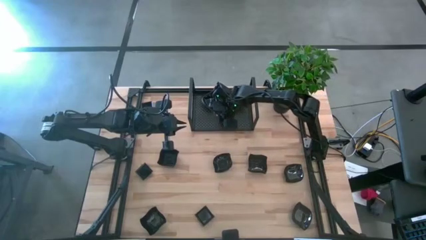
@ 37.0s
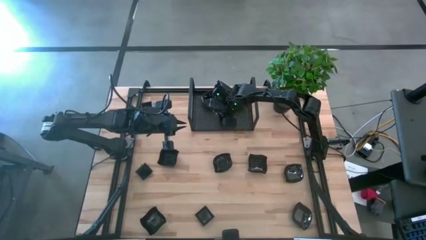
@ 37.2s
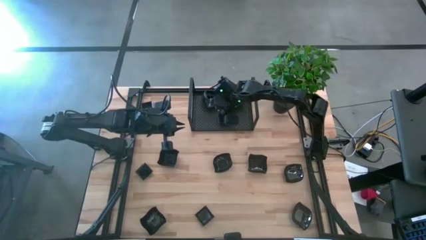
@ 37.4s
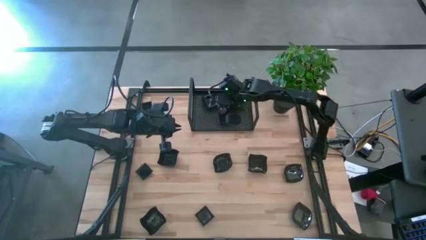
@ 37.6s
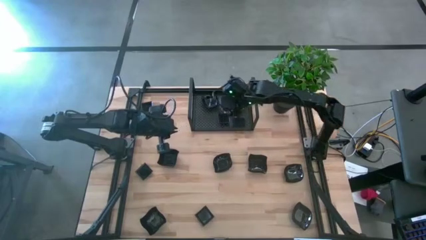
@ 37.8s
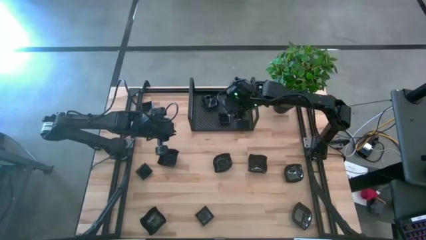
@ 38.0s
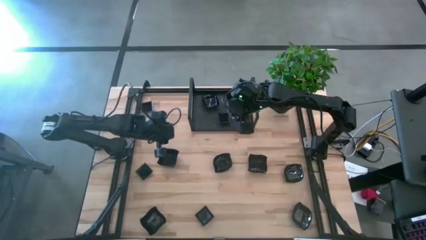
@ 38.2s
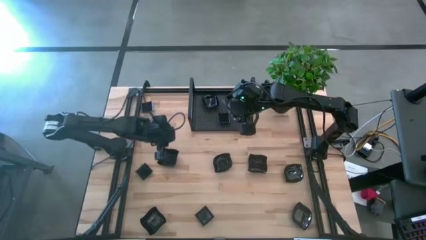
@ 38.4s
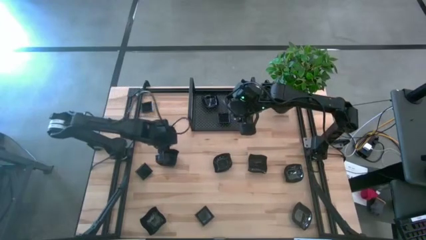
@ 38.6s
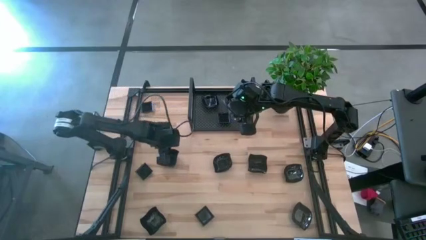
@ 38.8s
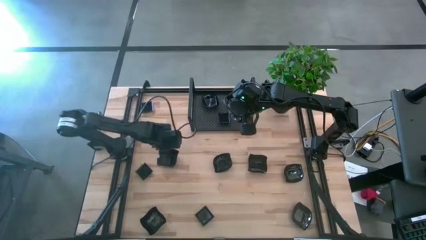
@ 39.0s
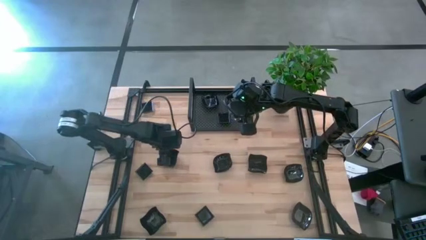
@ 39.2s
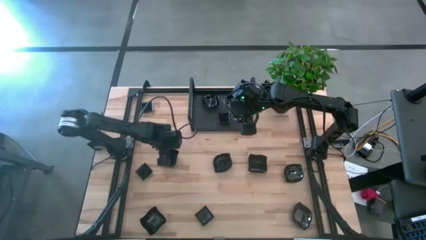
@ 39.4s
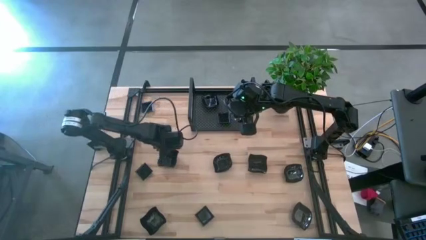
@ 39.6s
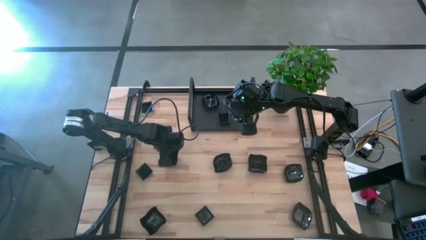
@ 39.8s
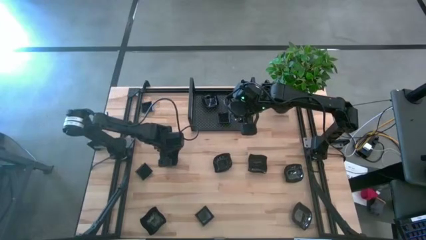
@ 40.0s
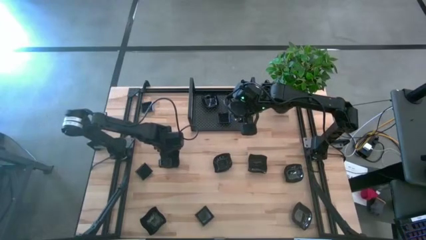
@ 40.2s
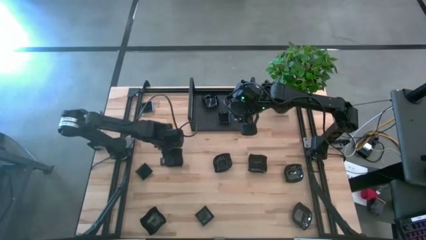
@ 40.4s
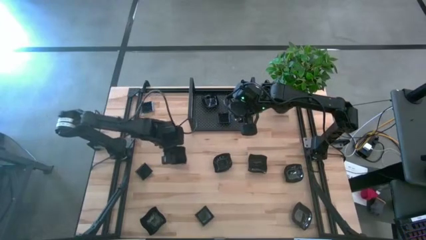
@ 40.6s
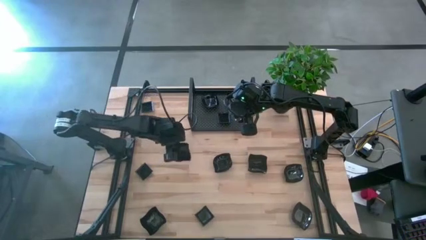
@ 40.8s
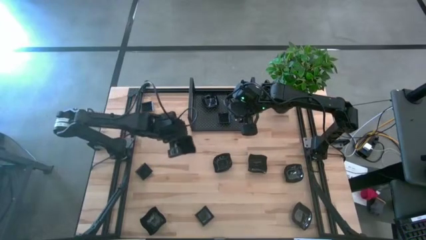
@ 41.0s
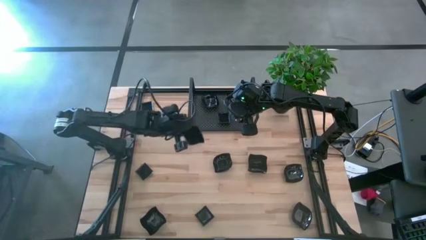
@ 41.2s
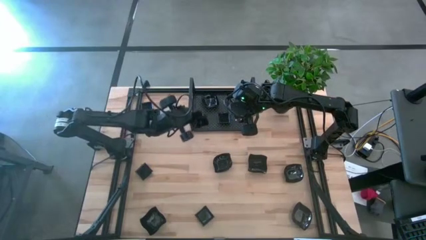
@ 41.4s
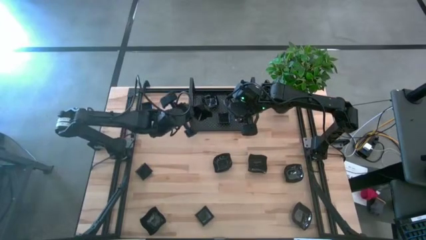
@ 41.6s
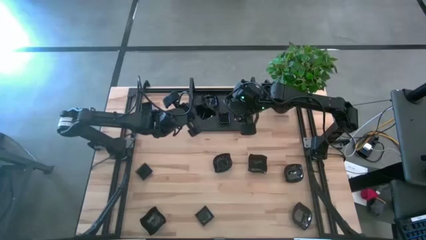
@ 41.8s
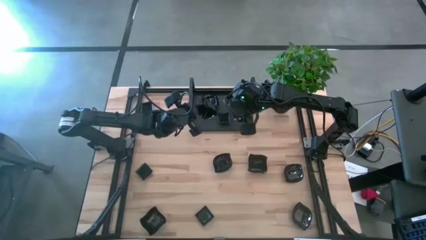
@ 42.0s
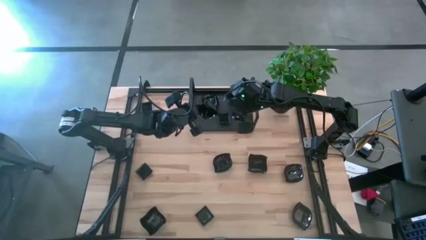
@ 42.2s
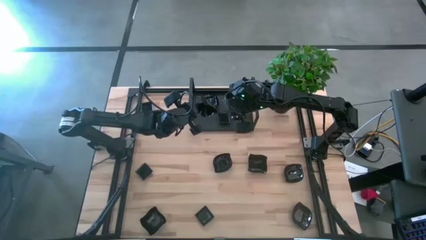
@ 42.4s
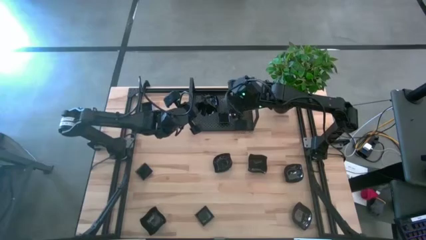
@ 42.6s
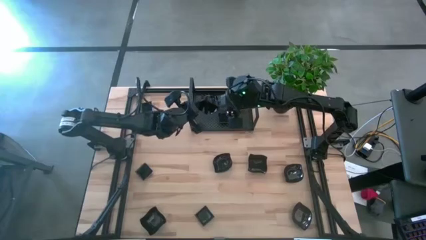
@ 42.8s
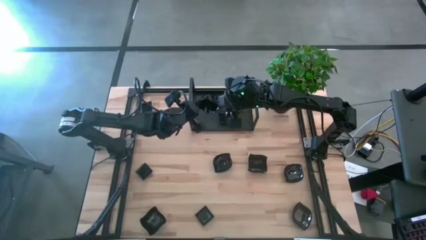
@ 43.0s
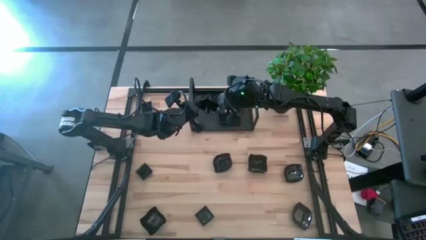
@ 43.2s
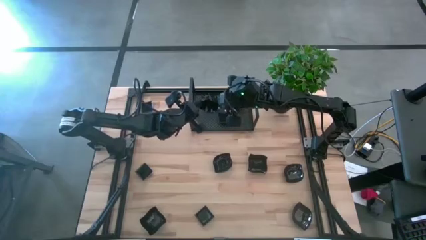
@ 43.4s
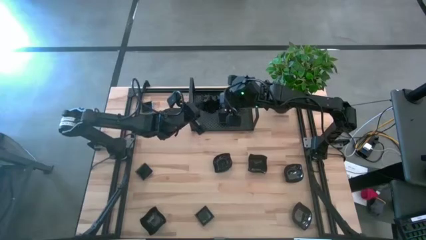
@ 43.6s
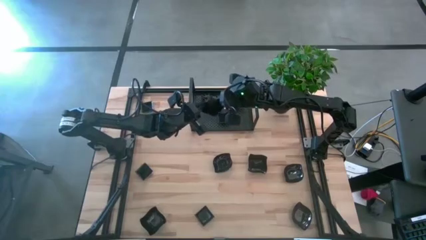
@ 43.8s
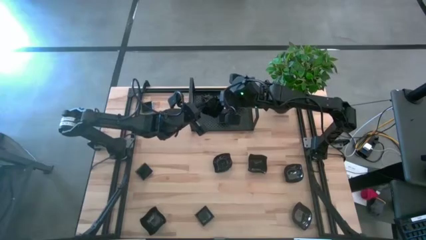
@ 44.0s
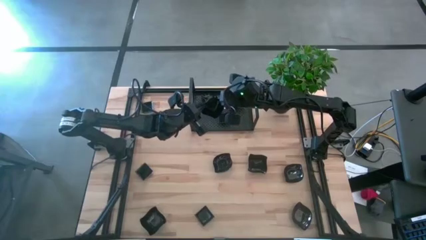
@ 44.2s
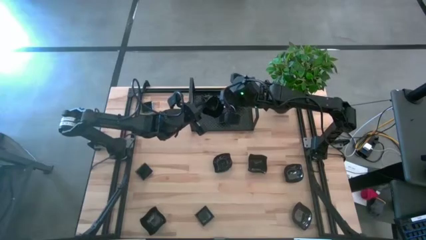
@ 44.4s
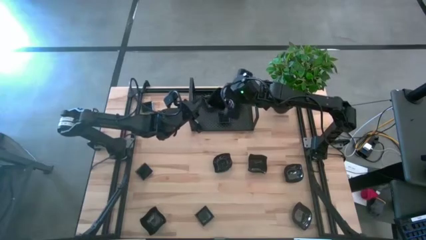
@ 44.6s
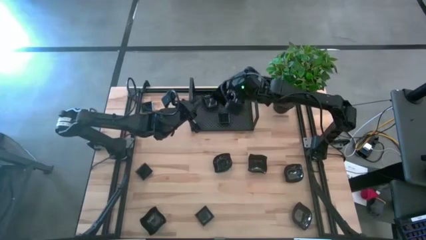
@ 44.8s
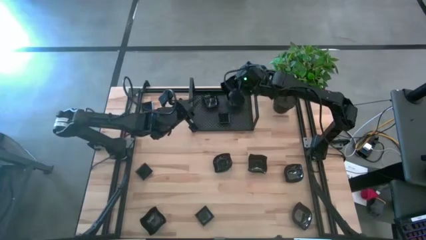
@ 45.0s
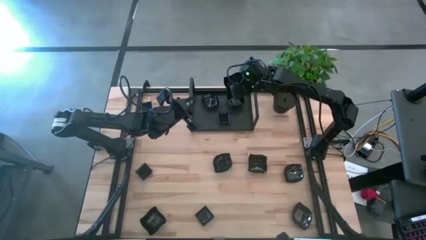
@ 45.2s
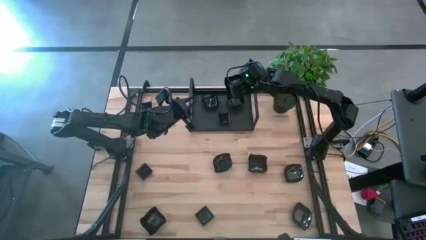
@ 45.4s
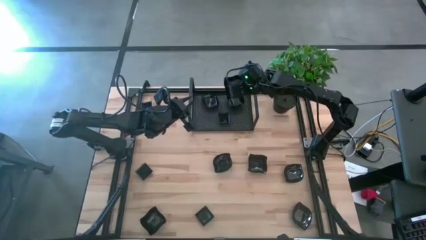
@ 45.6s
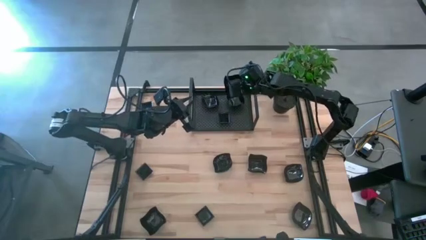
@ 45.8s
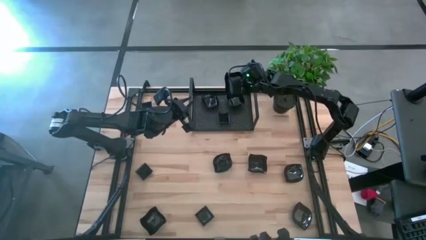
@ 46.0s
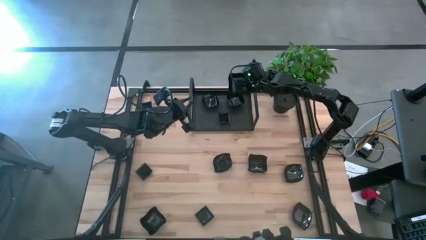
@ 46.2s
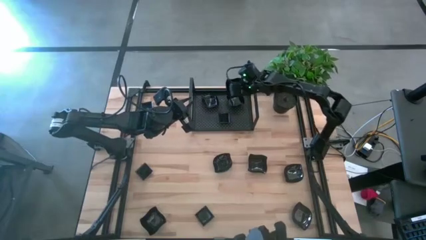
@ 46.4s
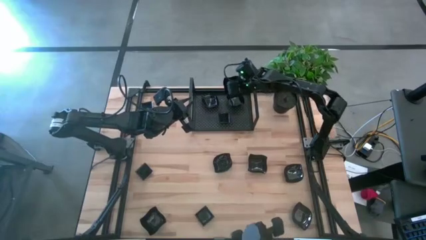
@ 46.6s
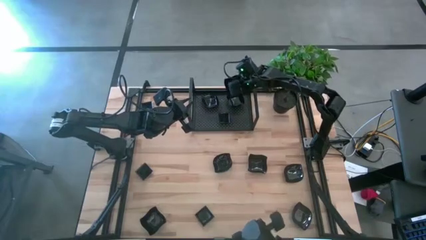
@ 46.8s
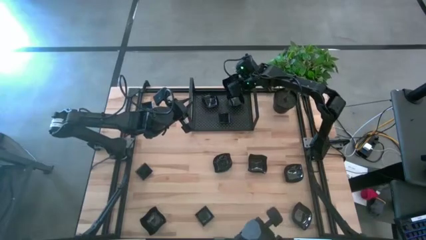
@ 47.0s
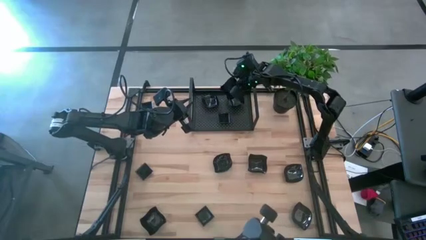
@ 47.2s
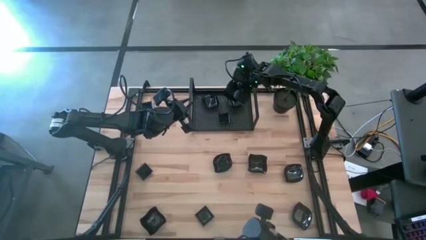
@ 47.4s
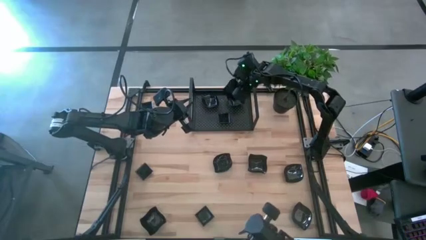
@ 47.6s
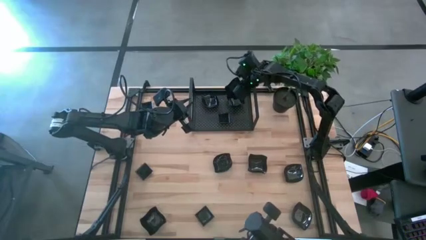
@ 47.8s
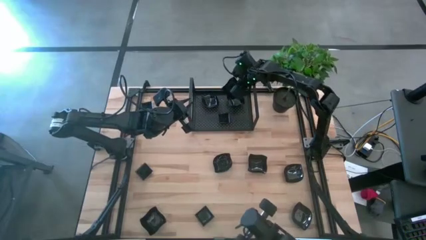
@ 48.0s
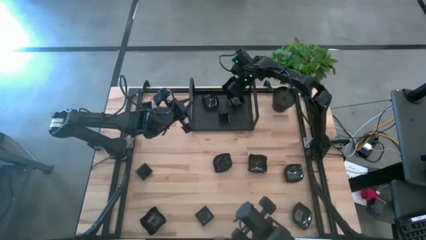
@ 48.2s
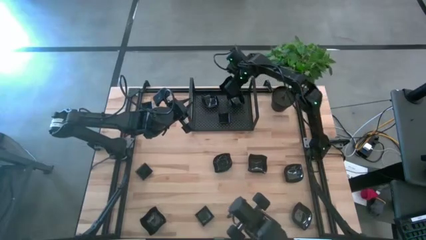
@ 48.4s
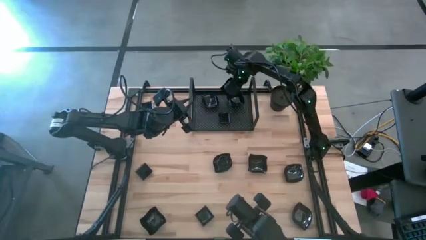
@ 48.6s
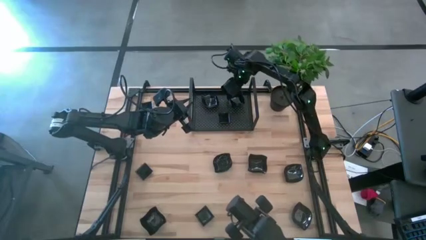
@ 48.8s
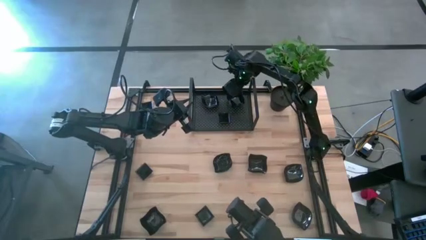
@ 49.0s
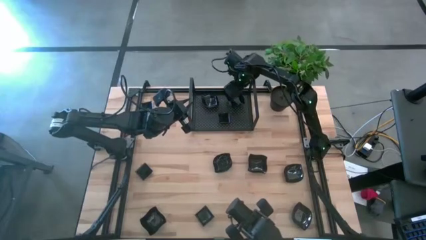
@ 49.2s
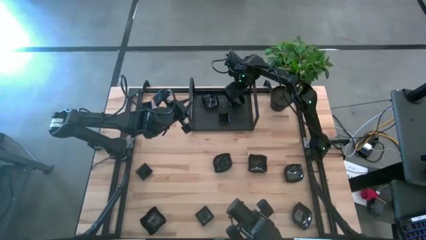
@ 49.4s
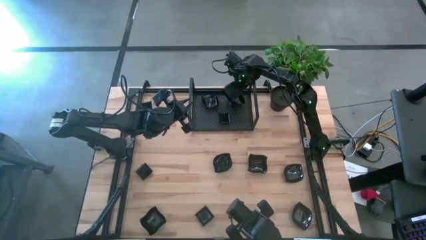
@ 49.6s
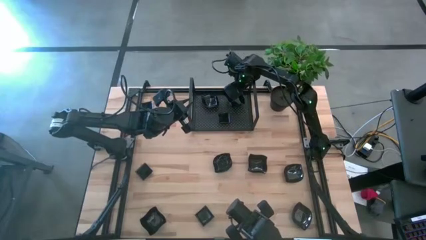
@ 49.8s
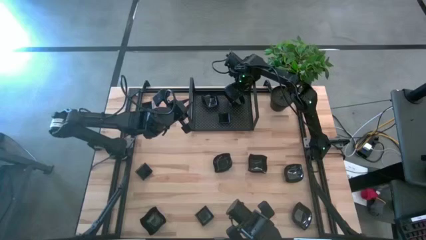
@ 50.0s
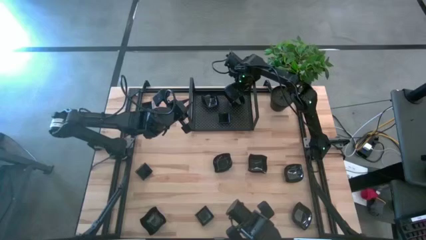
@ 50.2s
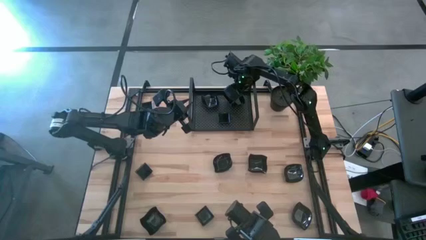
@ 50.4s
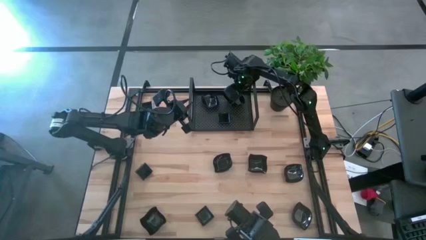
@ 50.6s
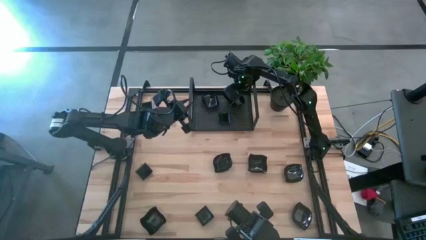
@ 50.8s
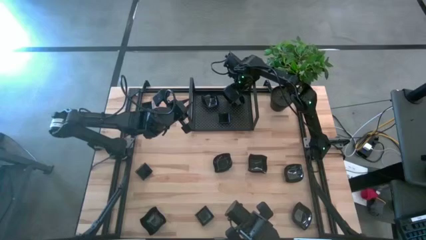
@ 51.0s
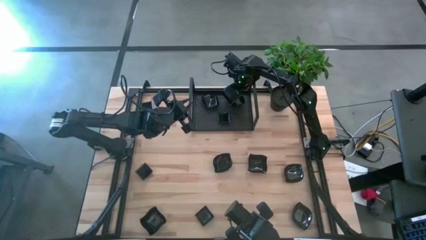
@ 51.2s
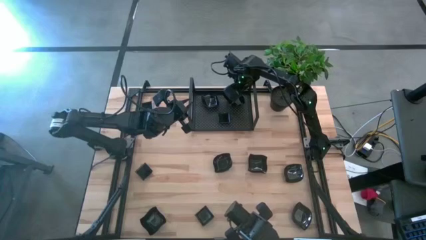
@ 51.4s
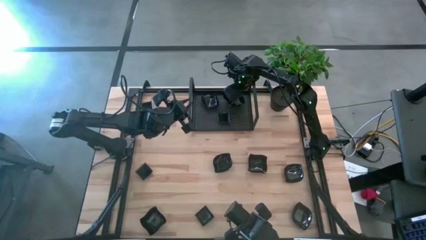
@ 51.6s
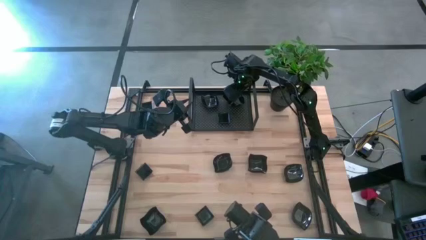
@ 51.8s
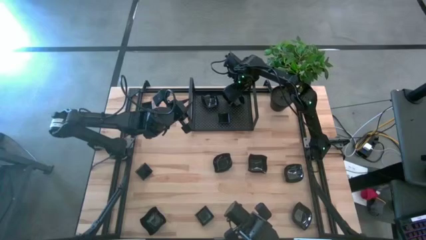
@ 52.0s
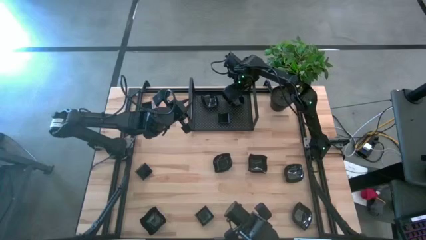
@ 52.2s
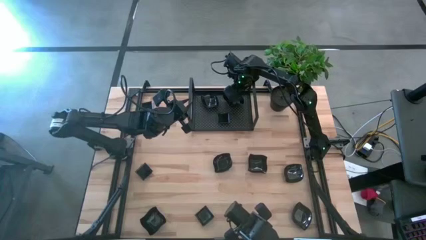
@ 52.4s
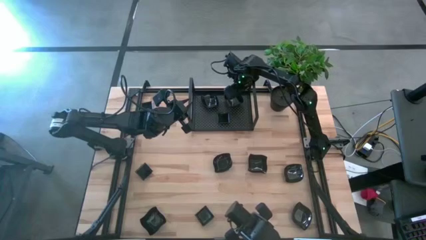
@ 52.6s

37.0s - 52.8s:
Task: Pick & Place Mini shaped plates
Stack the black distorted square plate on top of the black distorted square plate on the shelf
